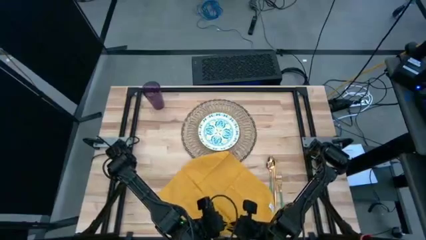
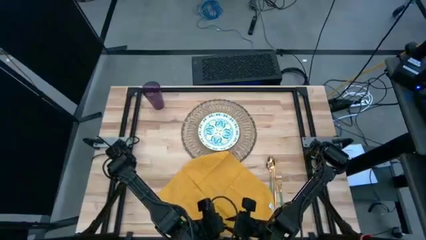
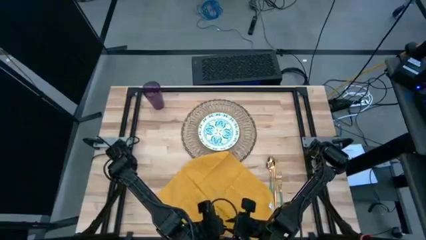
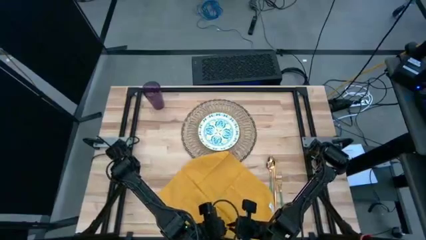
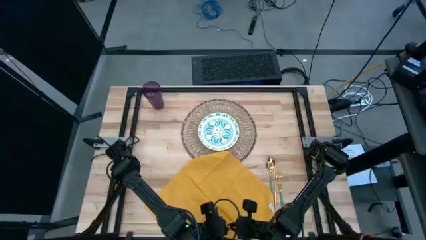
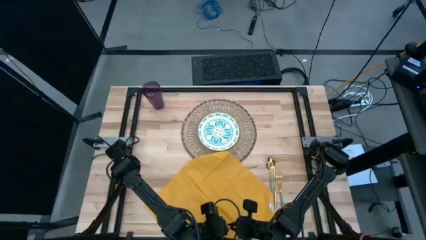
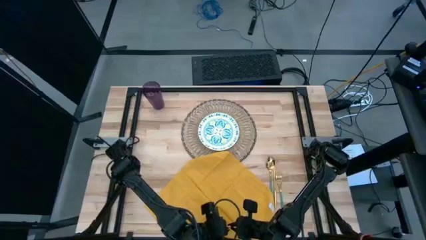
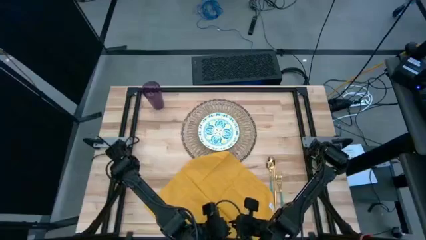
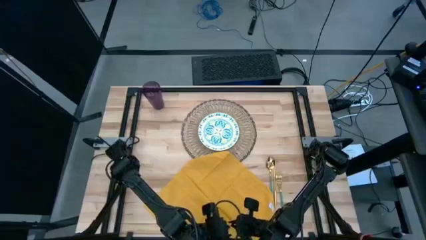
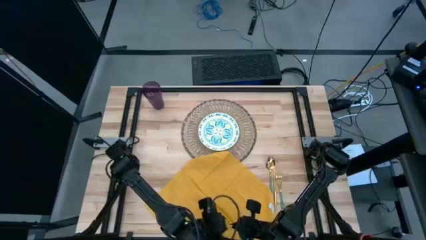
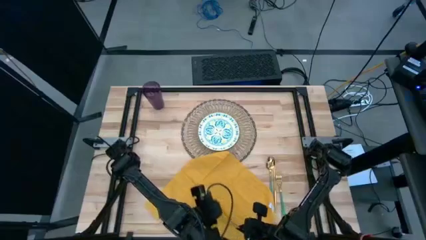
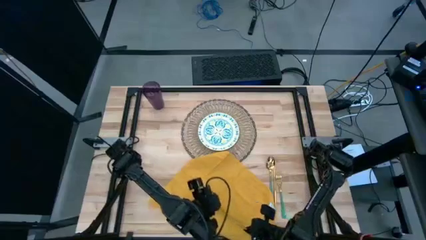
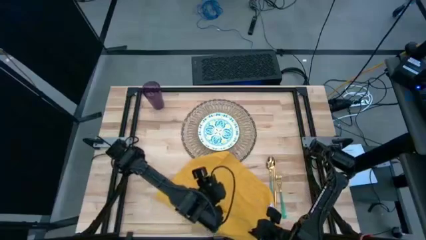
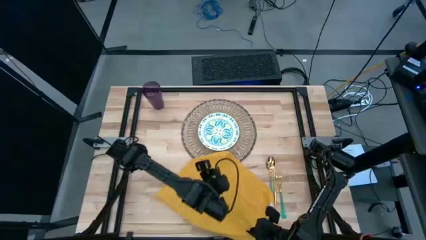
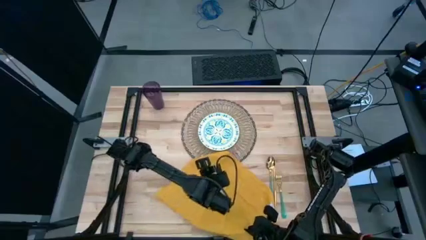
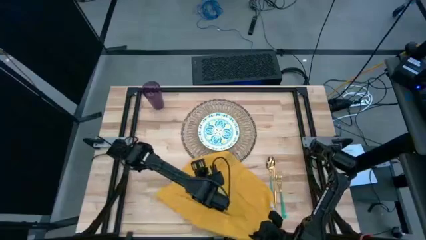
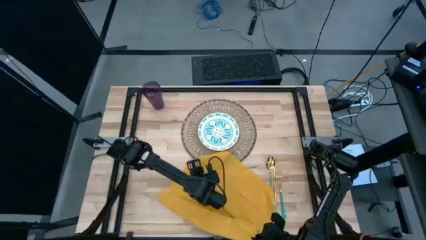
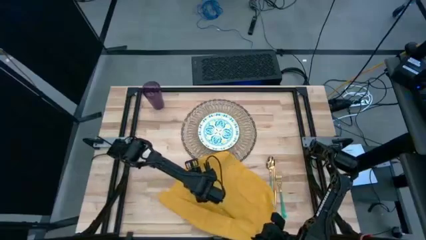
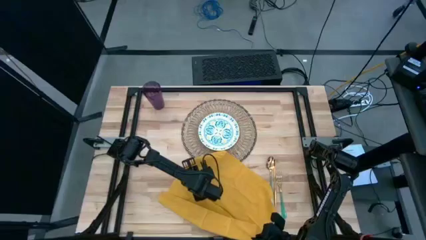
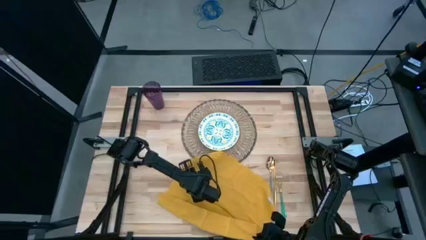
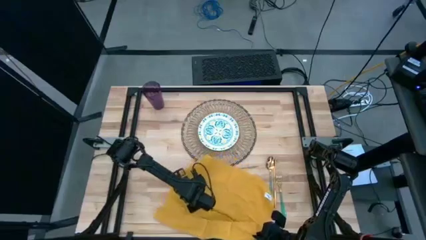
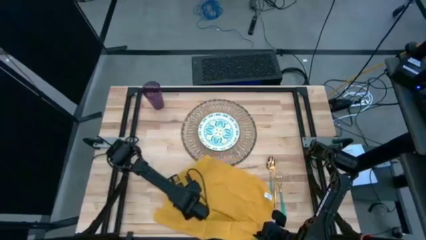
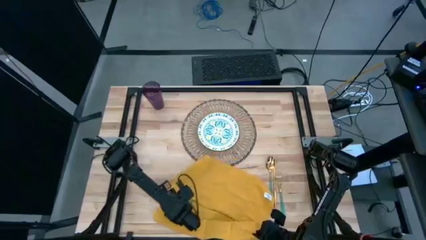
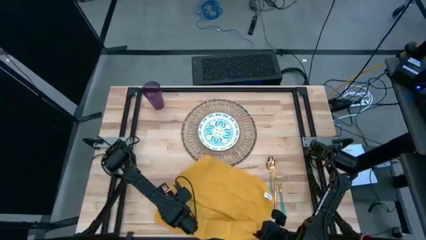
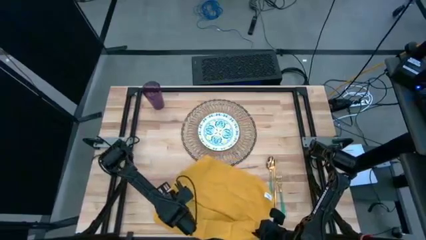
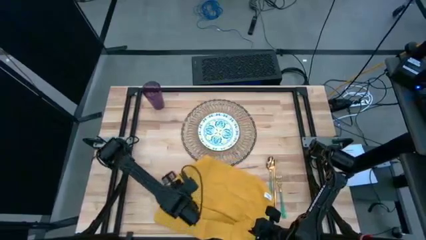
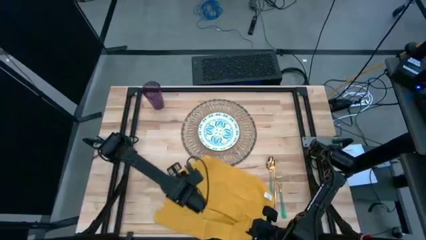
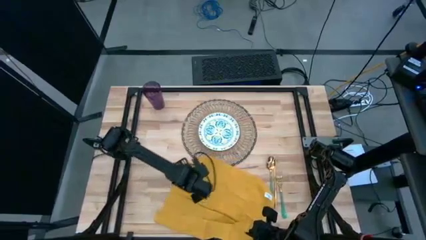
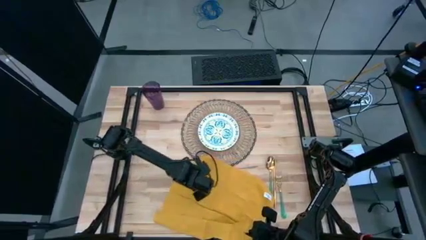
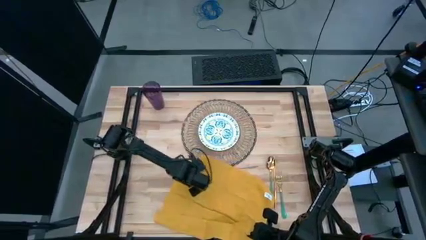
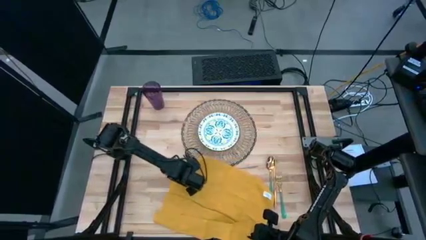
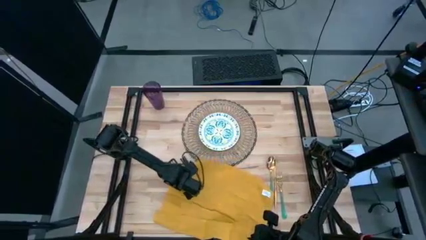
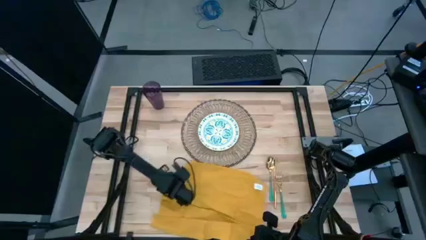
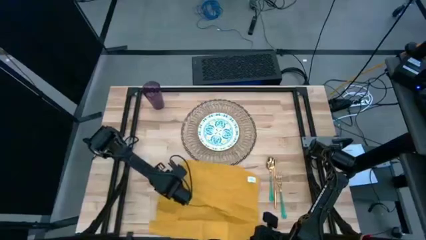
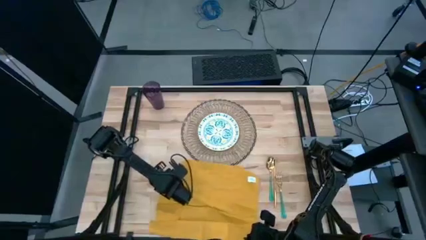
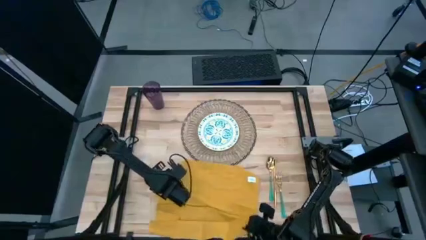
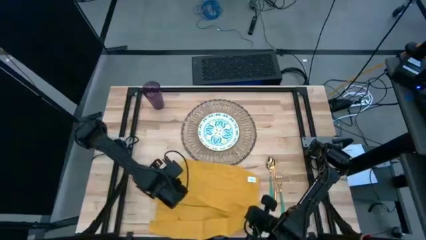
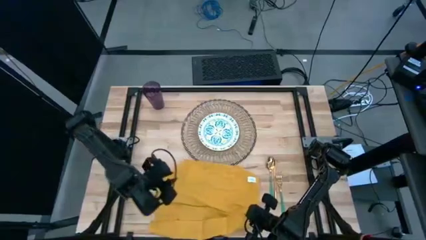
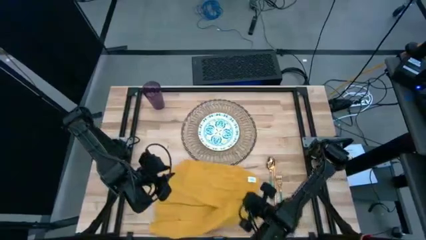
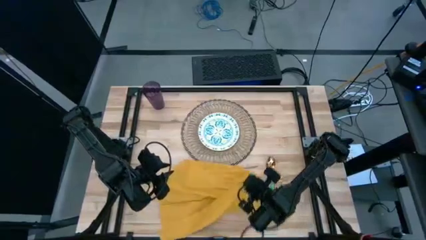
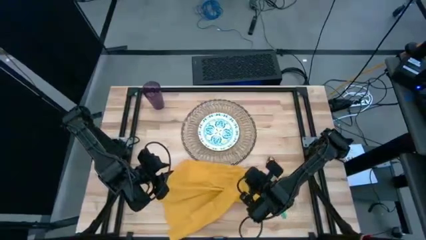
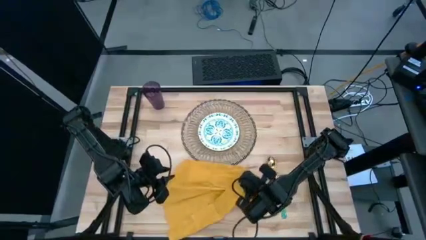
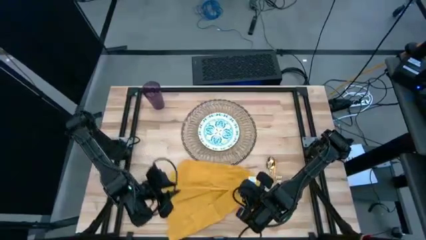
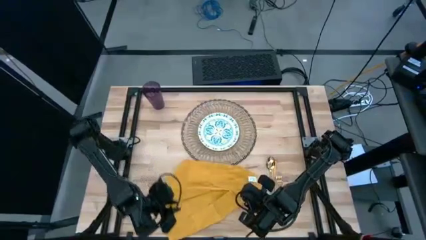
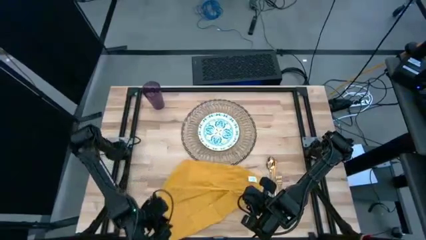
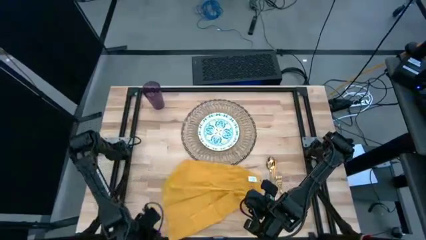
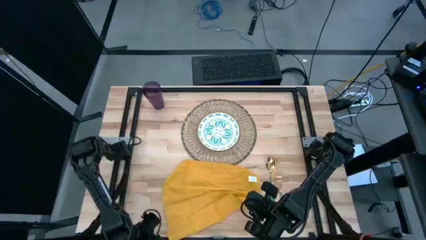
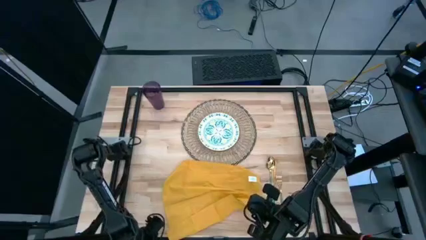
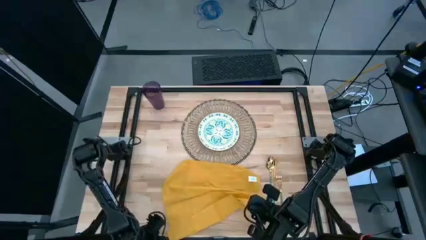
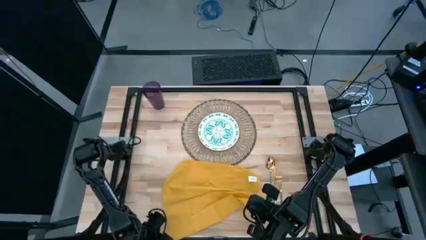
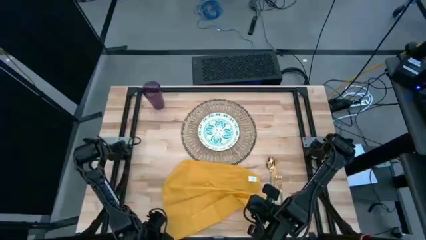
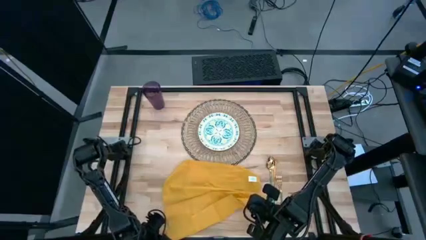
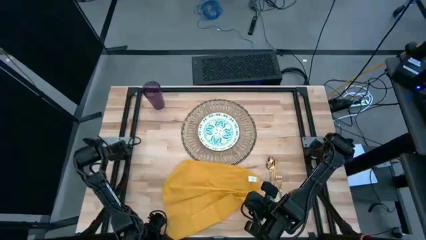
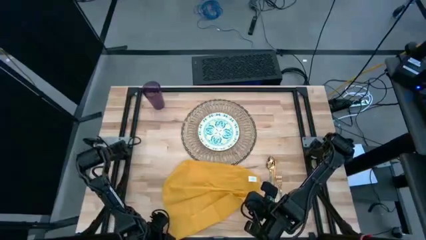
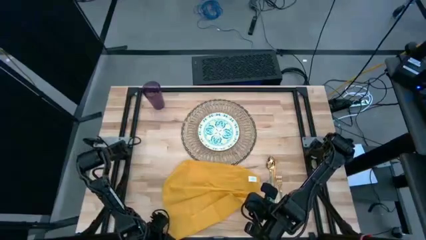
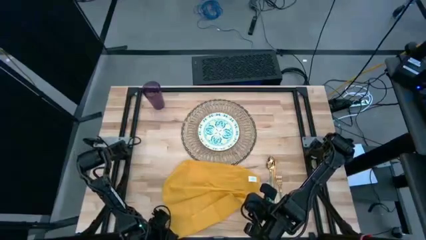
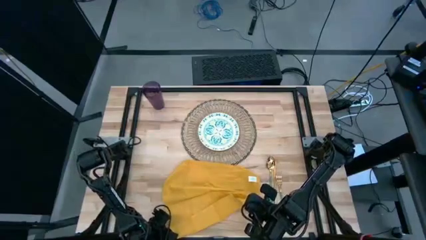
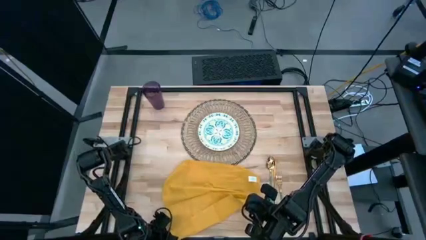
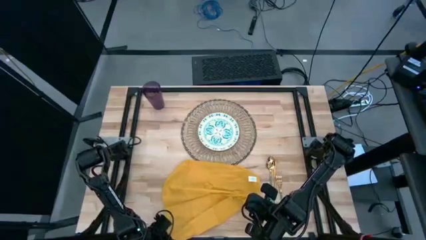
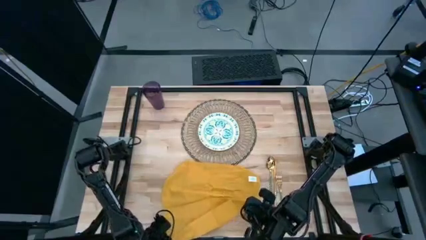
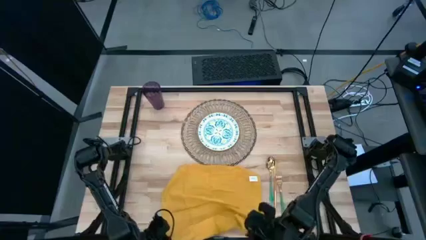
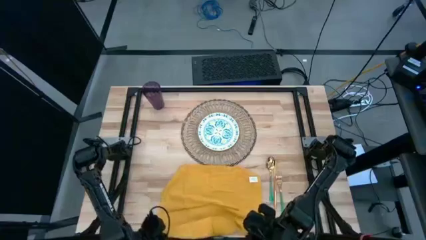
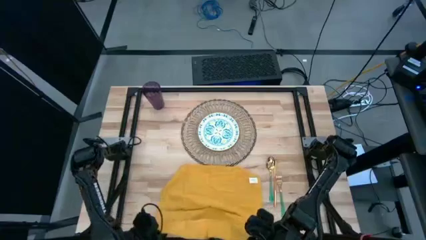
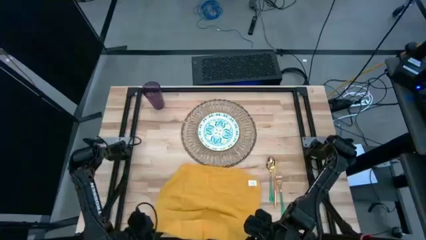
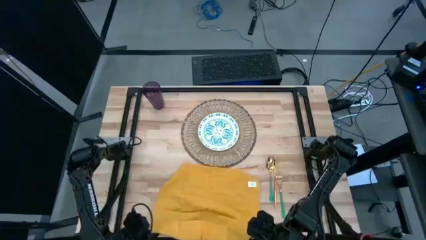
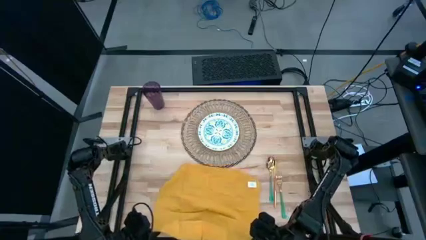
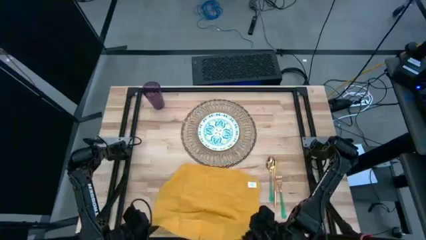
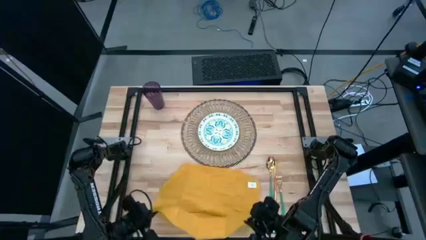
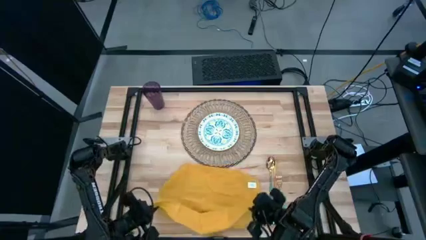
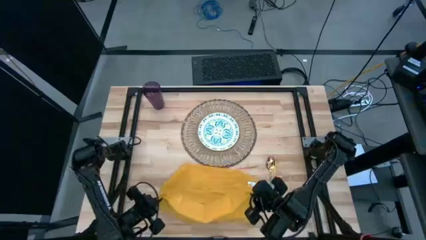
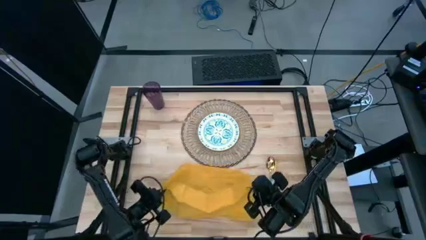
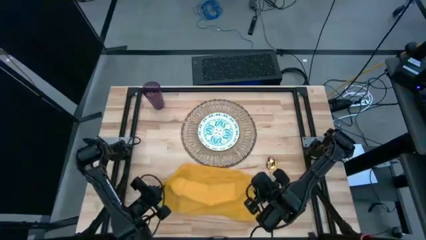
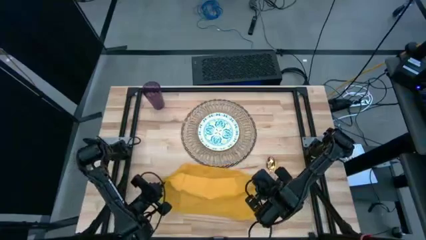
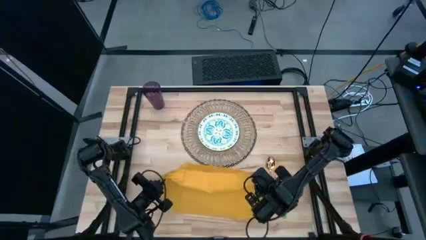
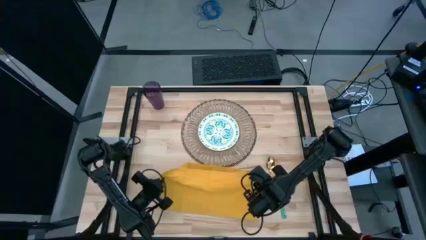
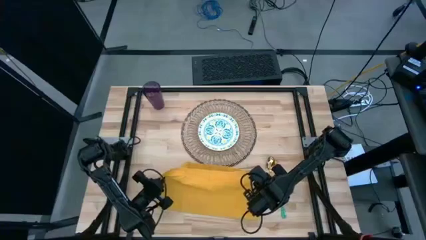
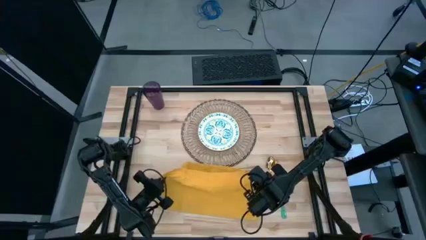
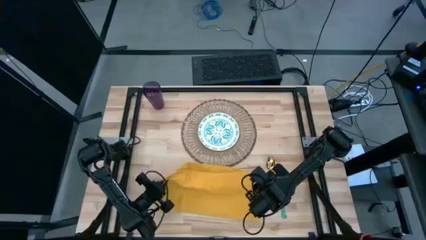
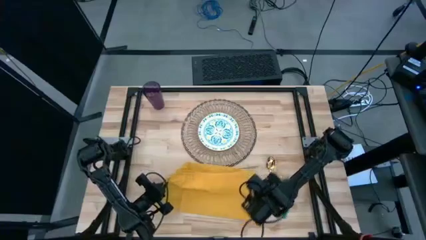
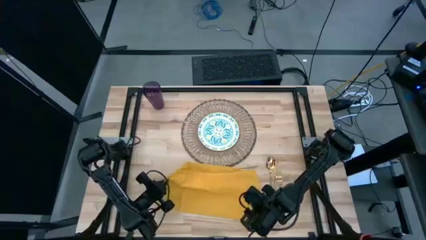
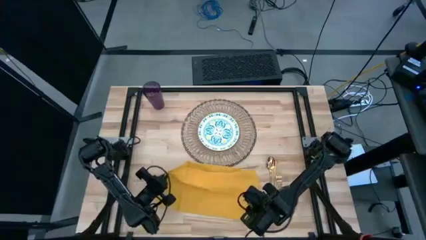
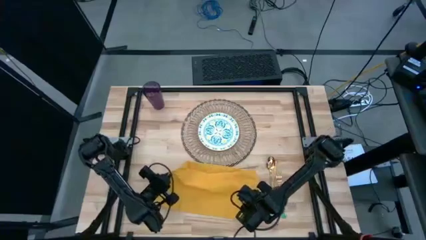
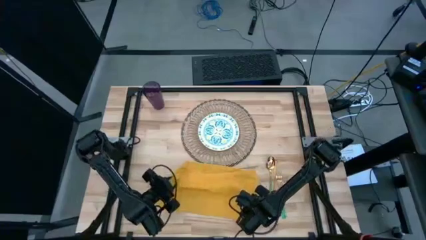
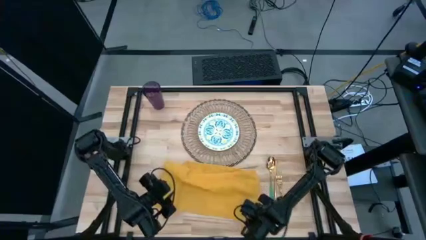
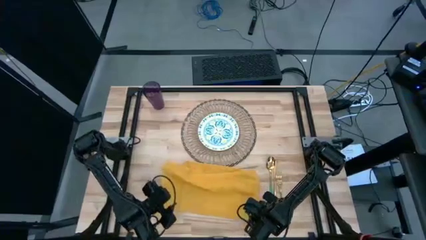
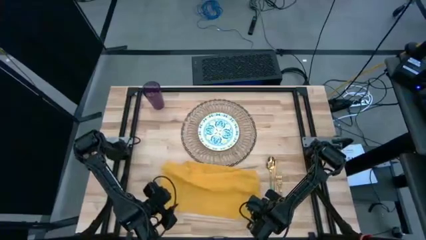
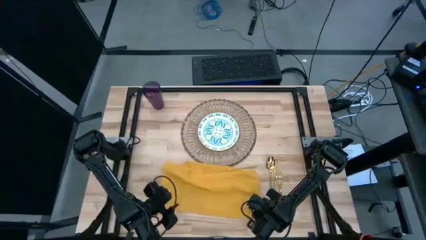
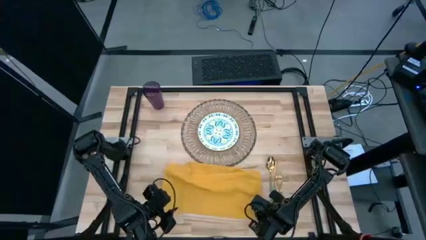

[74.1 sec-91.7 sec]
Task: Set table place
Fold the yellow table napkin
